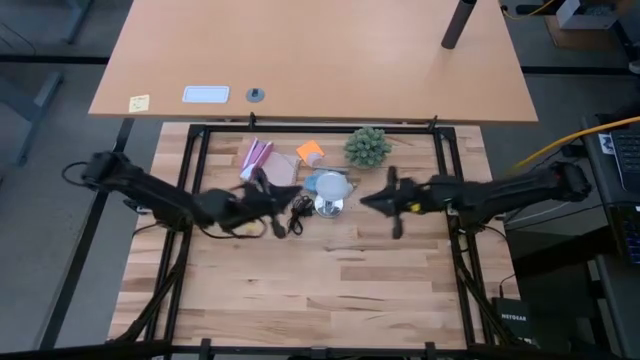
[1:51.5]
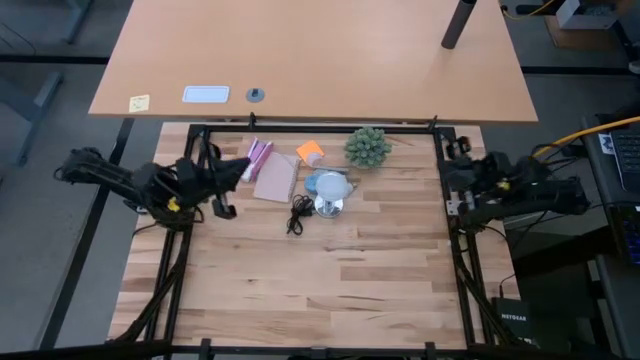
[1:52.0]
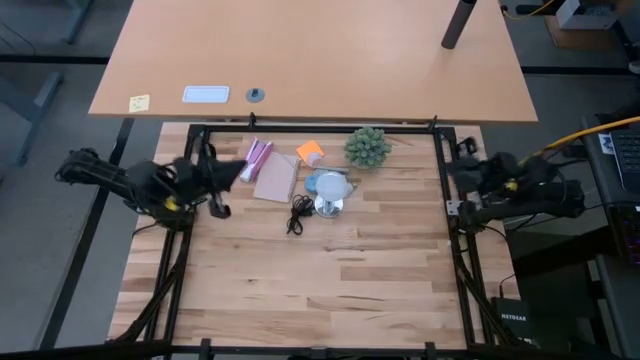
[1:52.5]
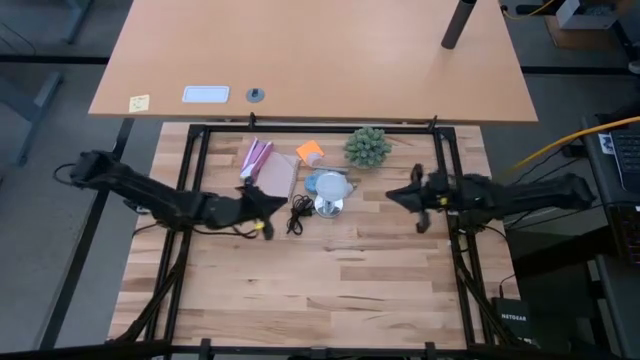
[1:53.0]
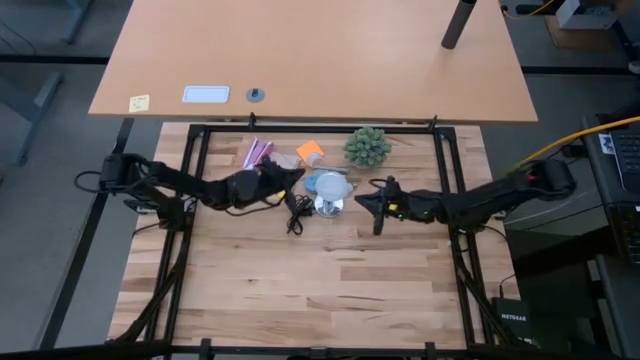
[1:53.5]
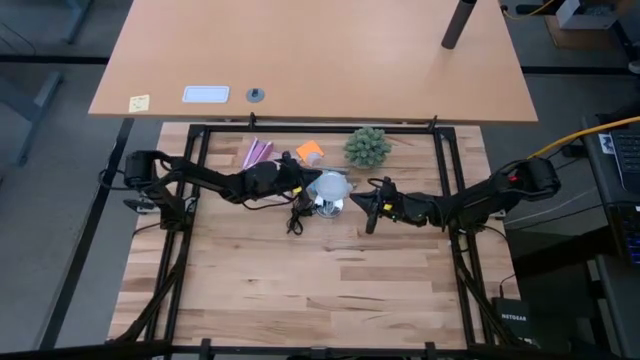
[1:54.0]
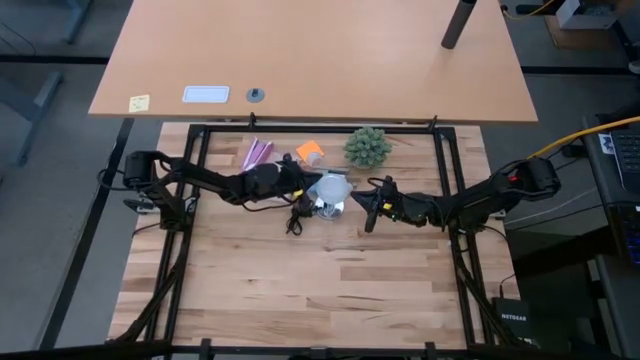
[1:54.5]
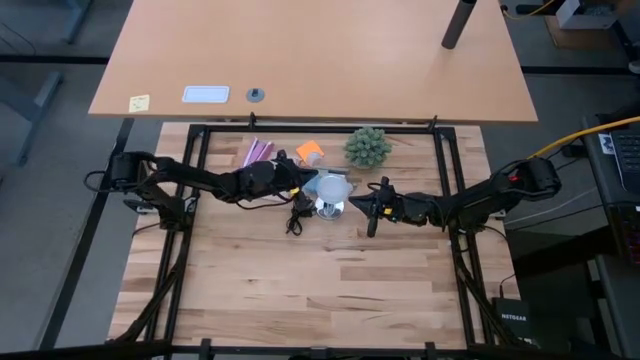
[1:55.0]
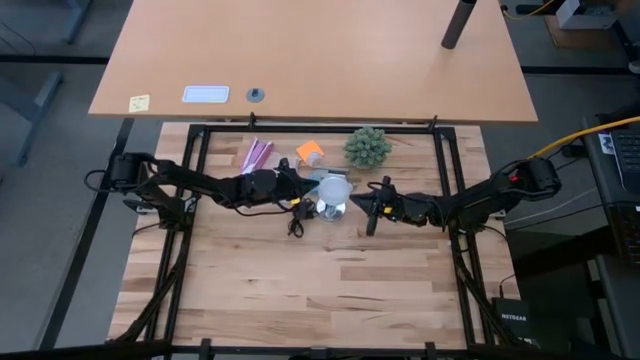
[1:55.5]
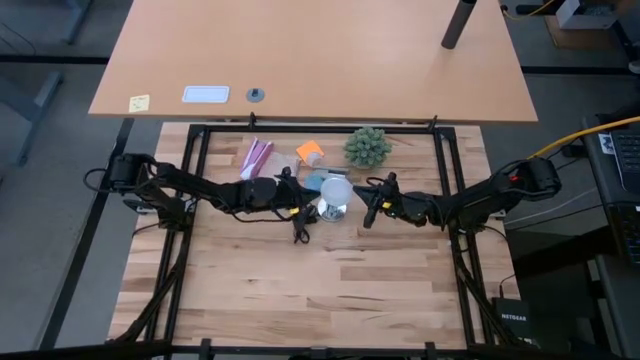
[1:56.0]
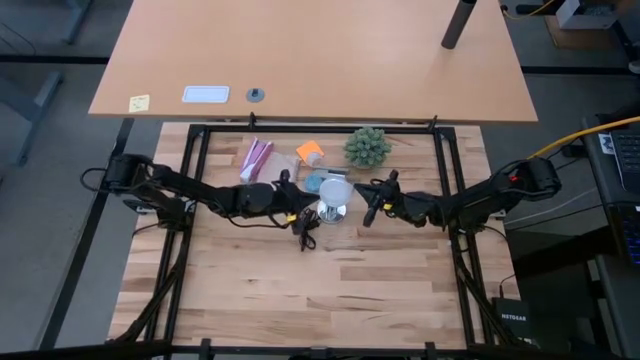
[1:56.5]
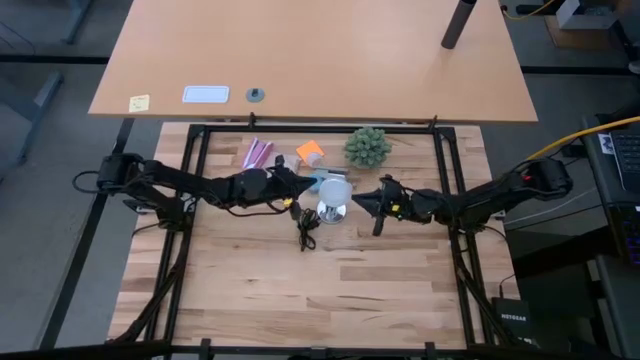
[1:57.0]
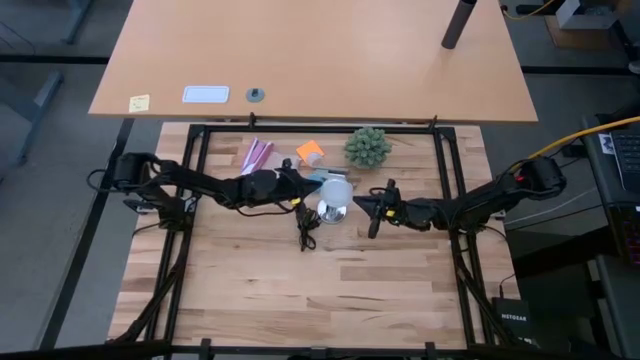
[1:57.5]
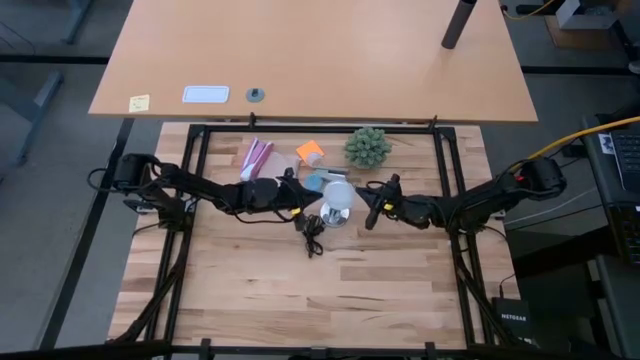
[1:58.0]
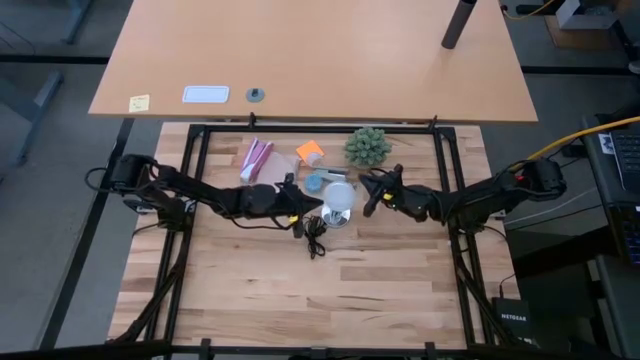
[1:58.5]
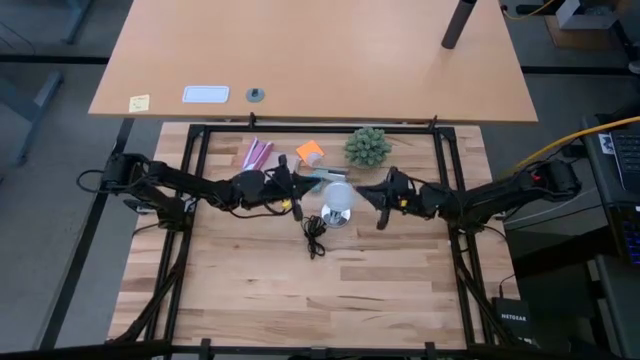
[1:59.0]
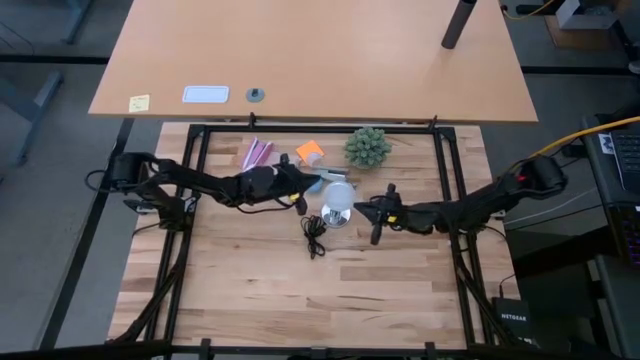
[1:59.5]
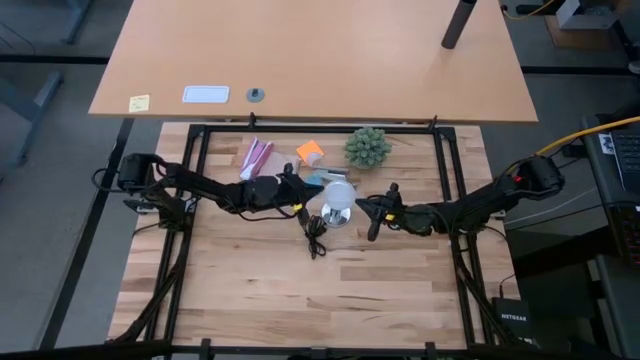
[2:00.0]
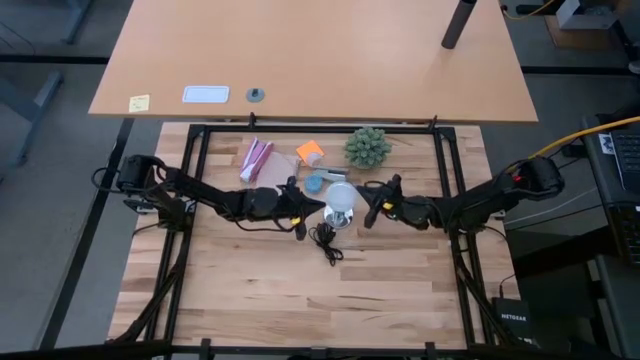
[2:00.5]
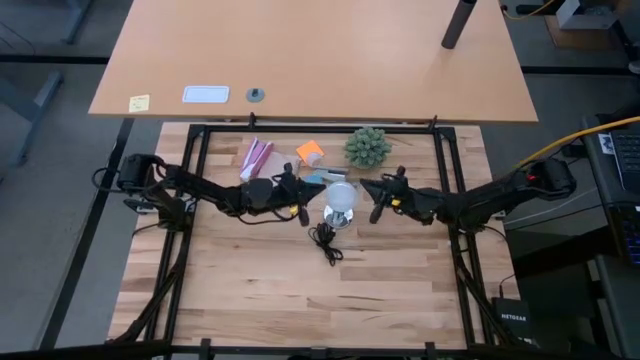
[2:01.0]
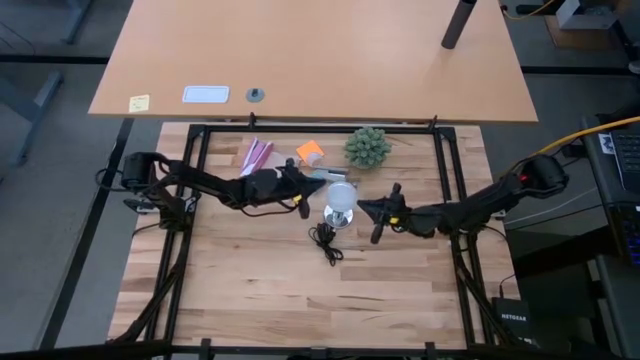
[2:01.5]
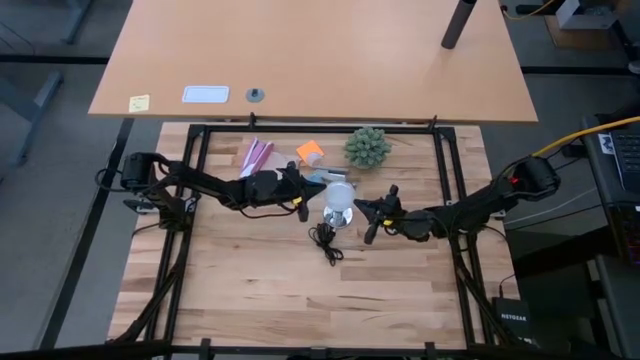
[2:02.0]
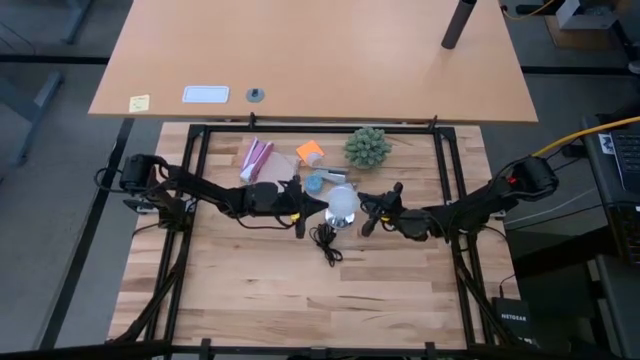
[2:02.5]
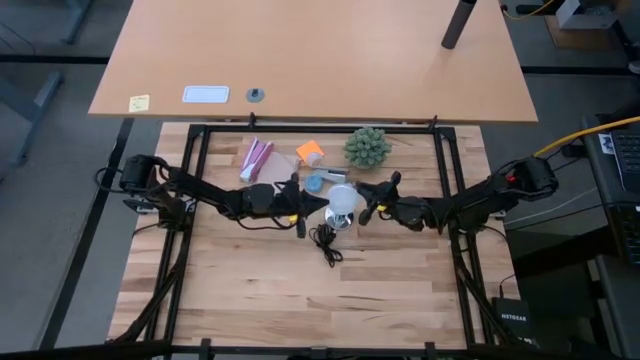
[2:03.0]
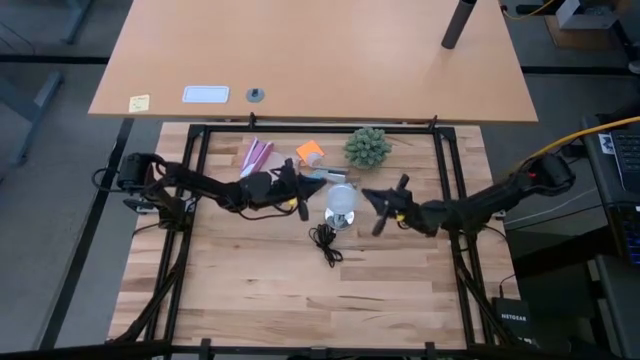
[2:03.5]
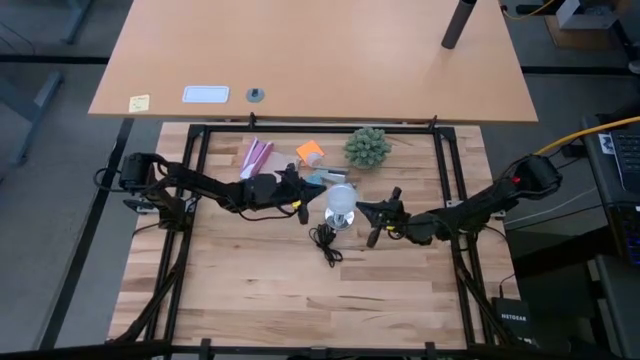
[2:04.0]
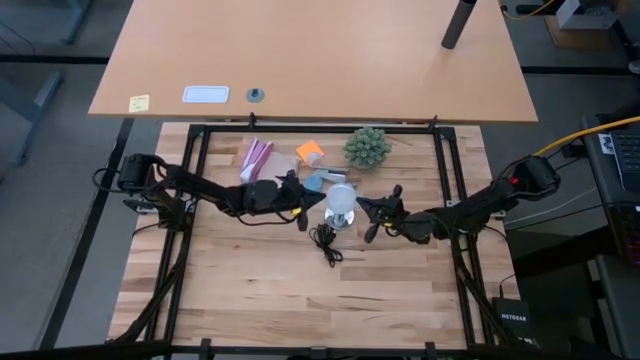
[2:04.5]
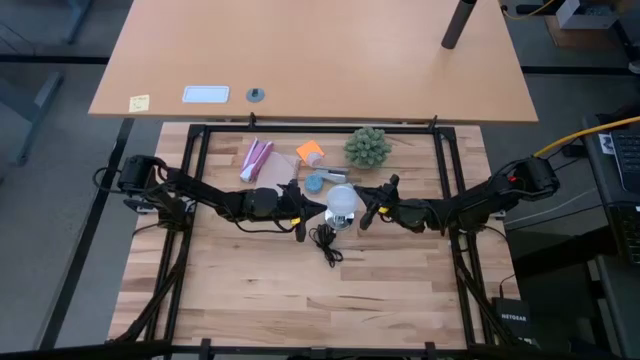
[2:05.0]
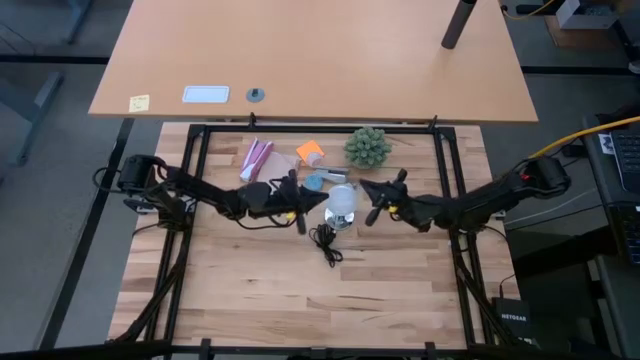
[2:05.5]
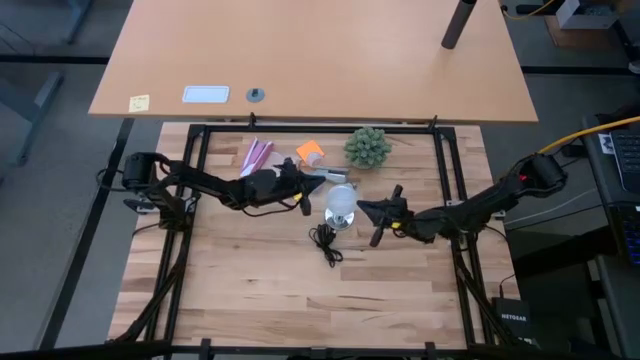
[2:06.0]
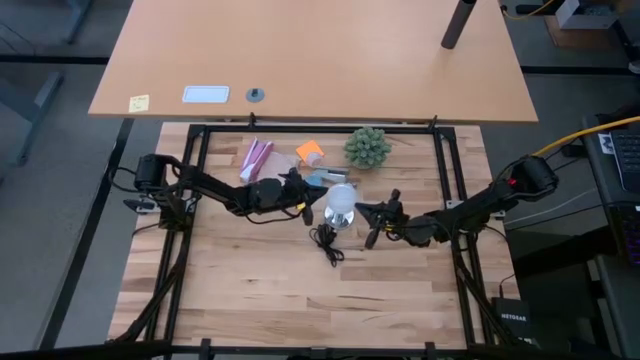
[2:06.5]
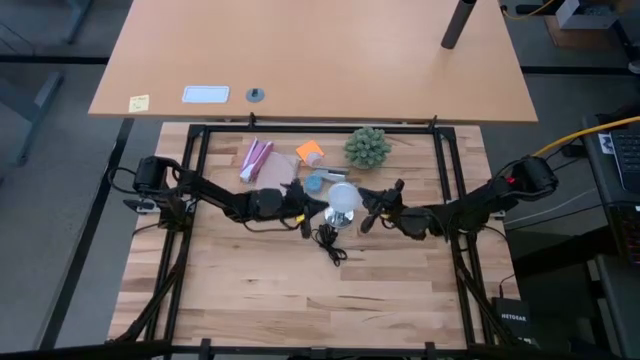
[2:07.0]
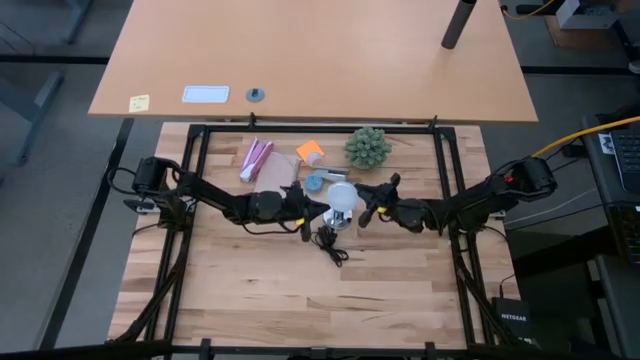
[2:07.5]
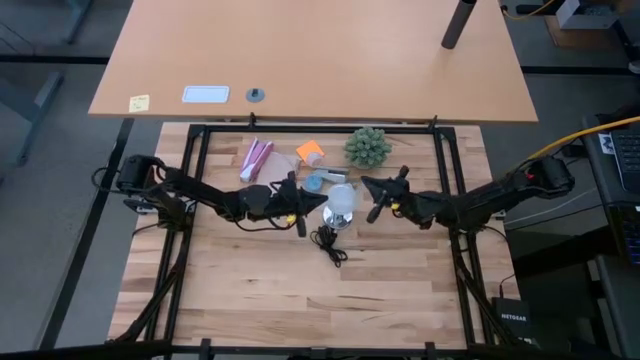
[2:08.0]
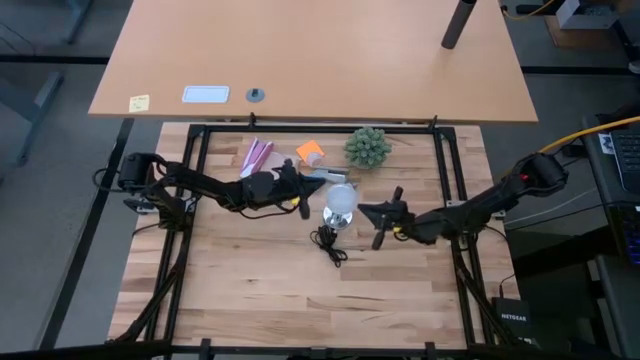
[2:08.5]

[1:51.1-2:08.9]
Task: Screw lightbulb
Remove the lightbulb from the silver lamp socket

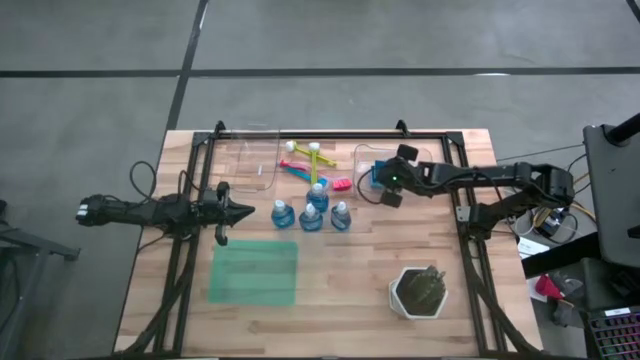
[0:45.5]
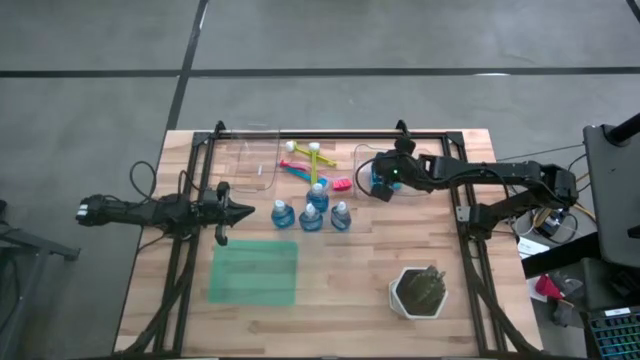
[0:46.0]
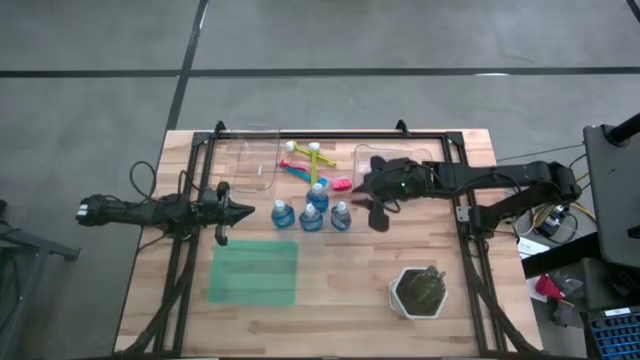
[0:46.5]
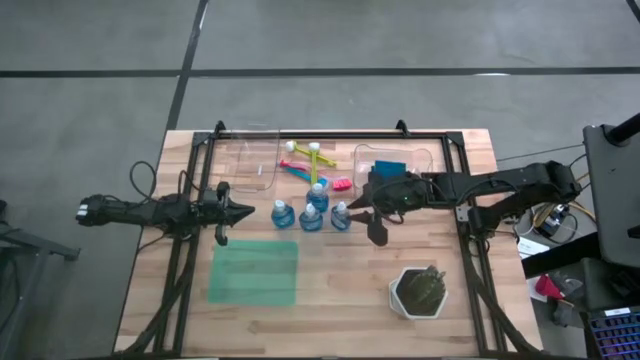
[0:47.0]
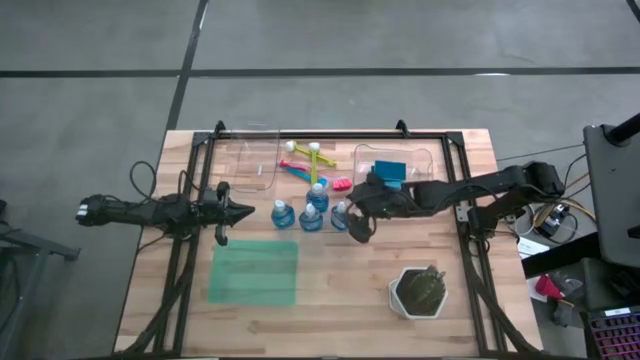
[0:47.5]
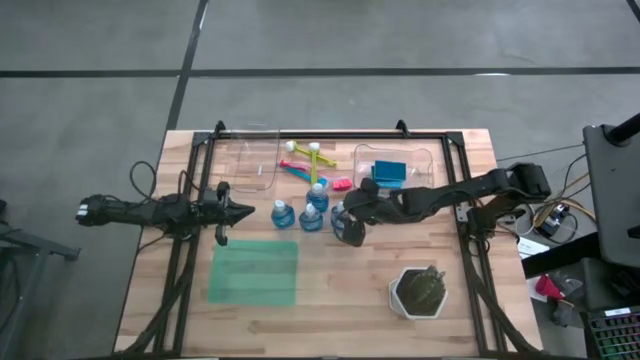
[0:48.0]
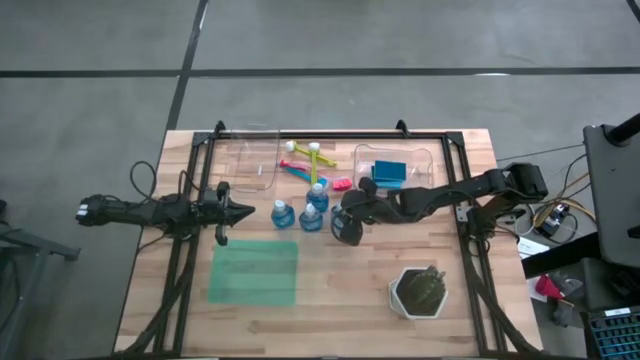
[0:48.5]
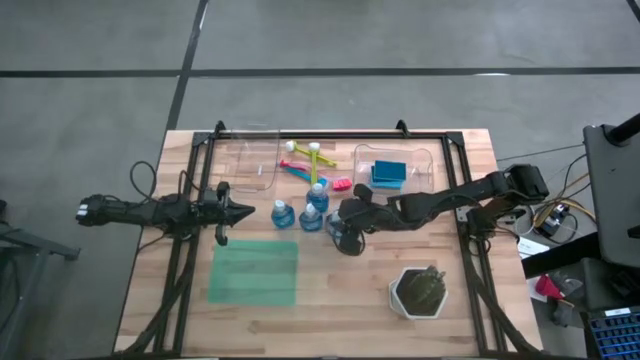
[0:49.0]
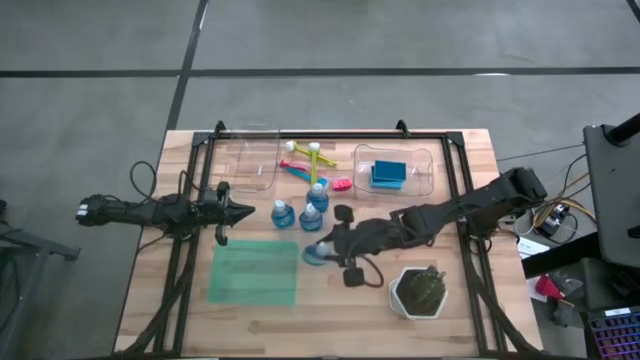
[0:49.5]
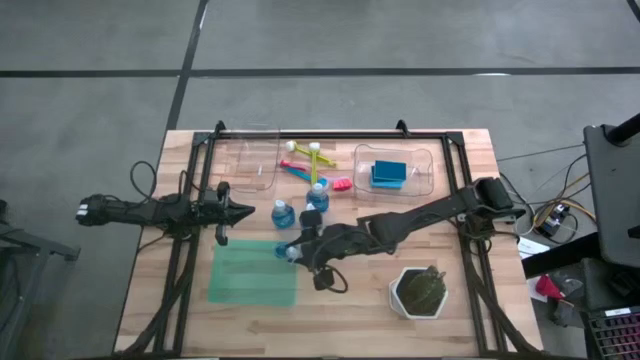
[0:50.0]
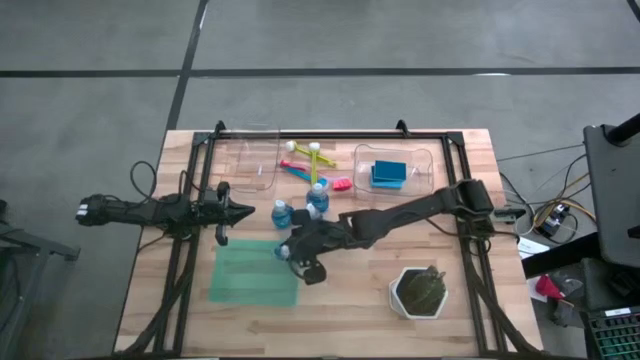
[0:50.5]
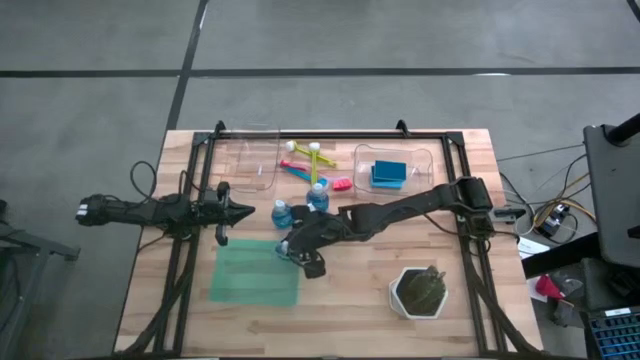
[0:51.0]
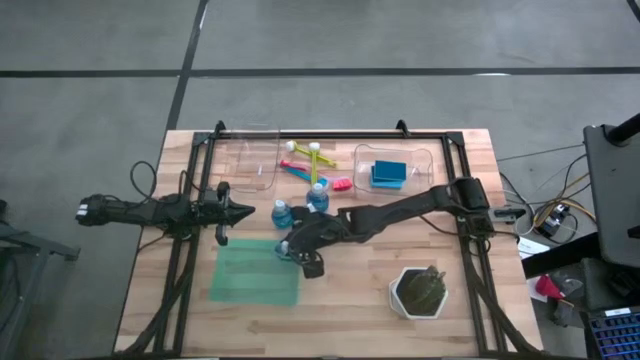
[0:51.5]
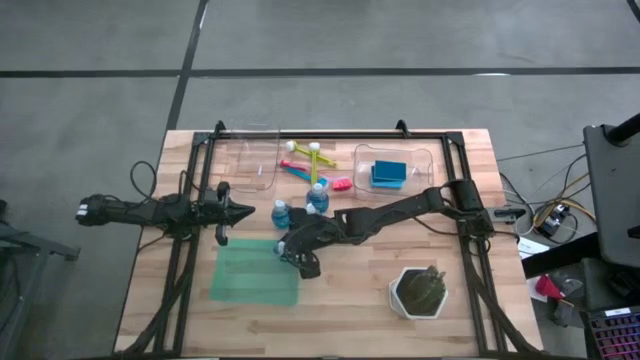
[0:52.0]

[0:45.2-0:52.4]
Task: Pick & Place Kitchen Sink Supplies
Put the blue dishwashing liquid bottle into the green bin
